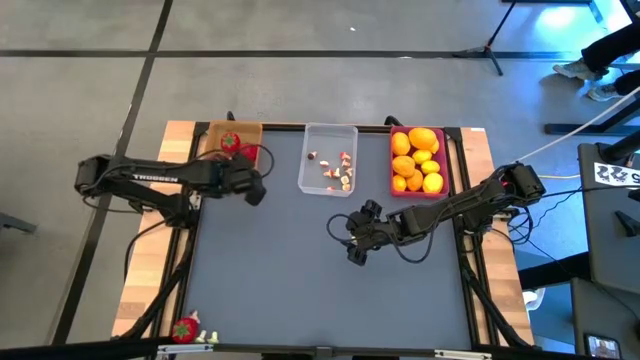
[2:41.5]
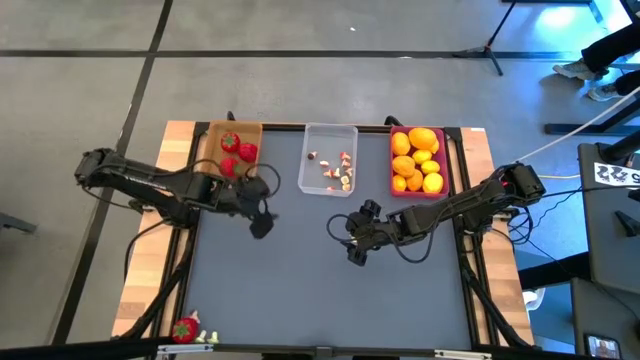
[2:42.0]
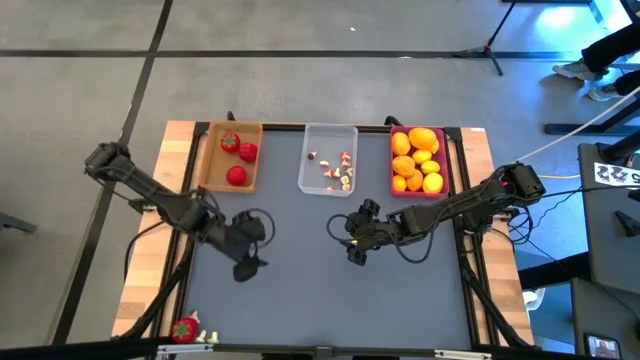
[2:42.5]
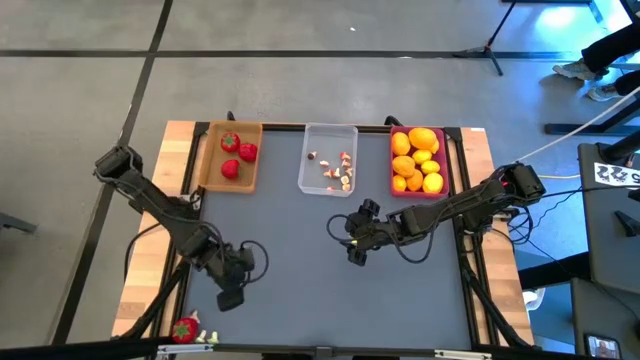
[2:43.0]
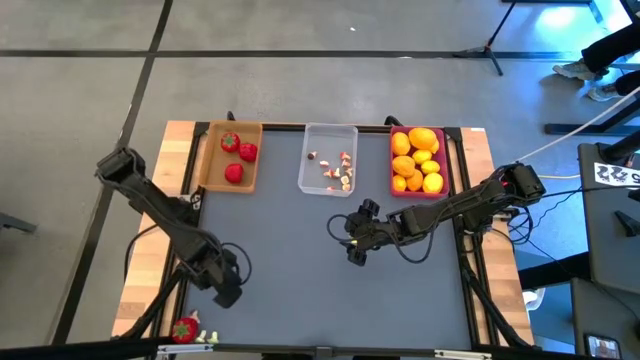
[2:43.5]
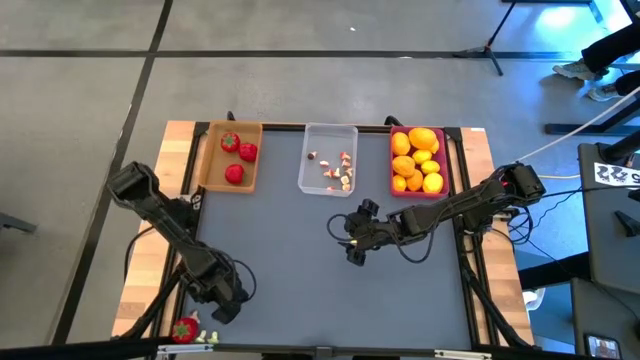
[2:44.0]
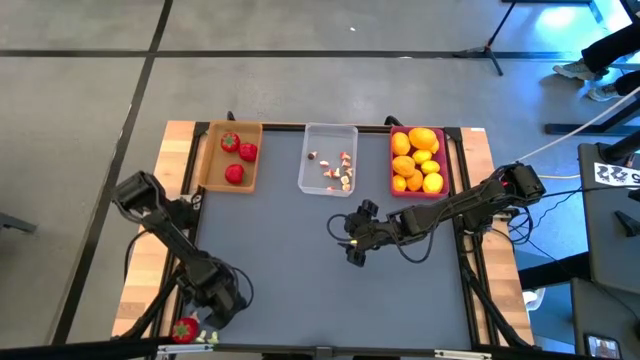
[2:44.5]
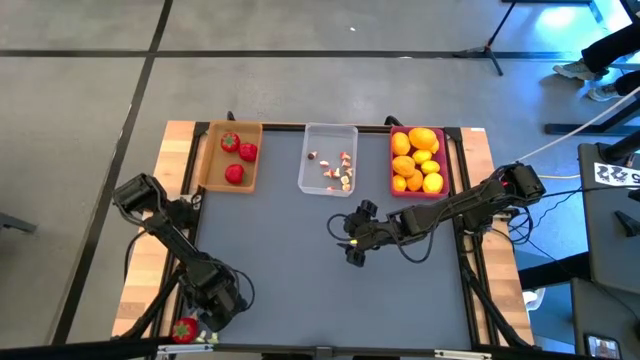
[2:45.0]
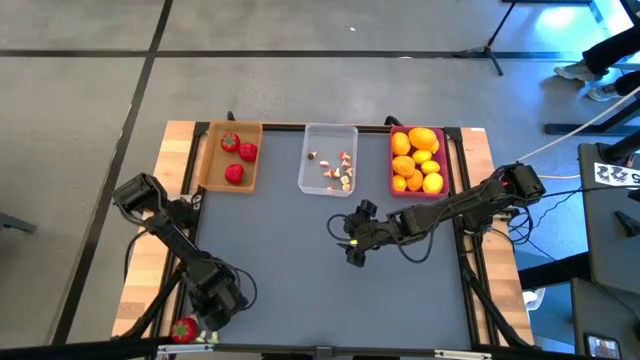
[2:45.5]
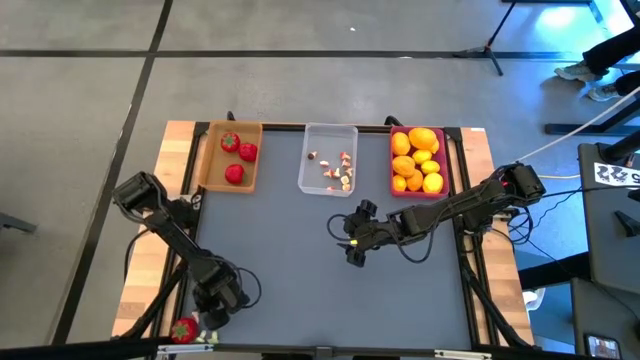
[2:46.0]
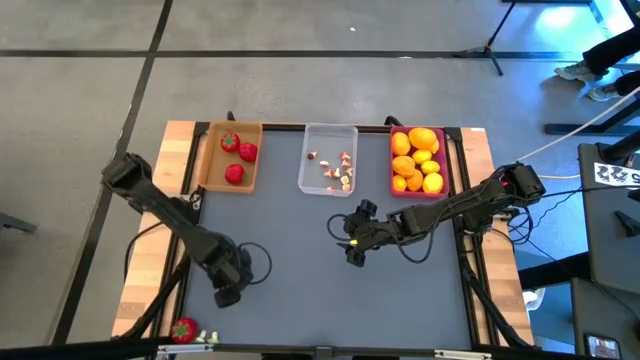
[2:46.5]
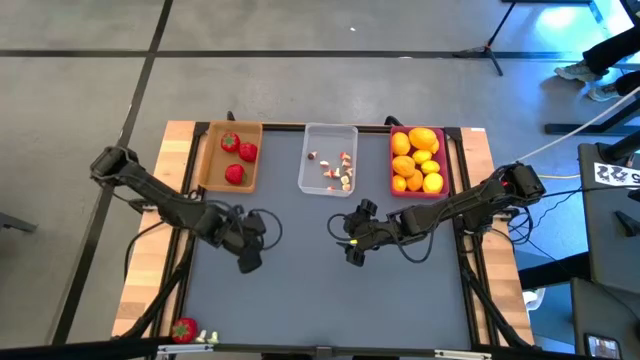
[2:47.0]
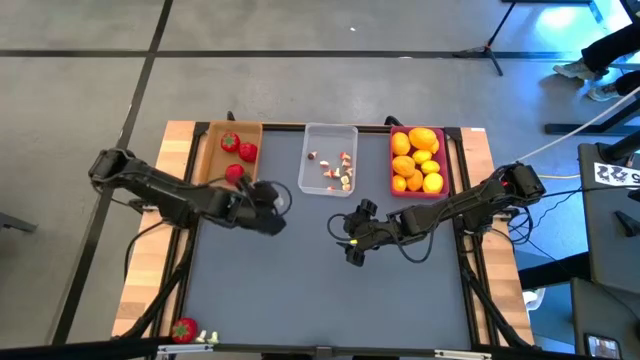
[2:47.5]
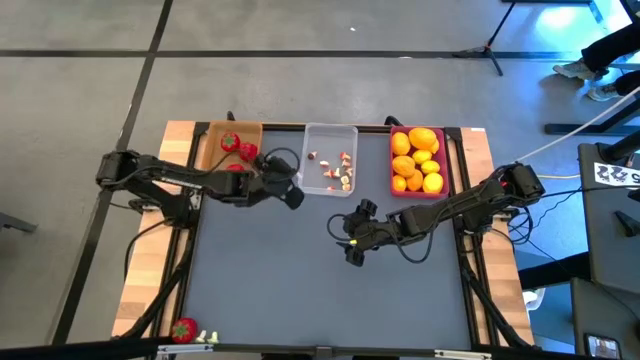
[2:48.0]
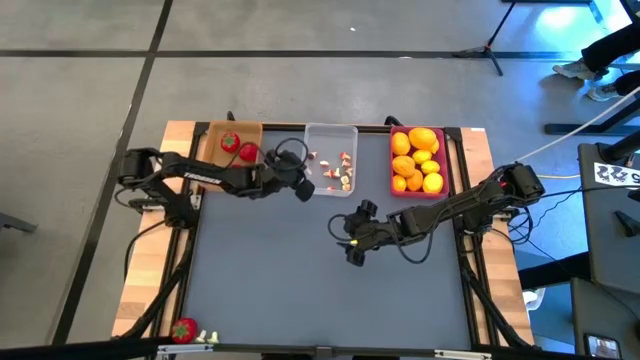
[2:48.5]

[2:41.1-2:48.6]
Task: Sort produce into baskets
Put the mushroom into the transparent bin

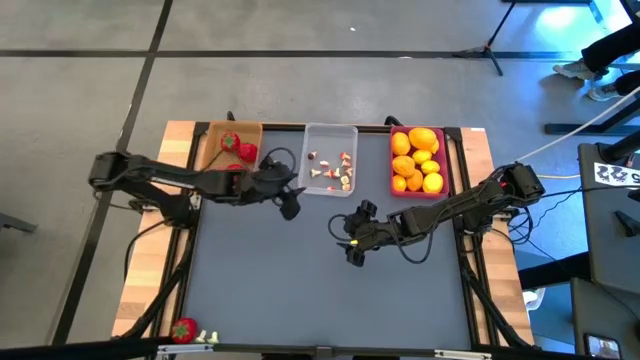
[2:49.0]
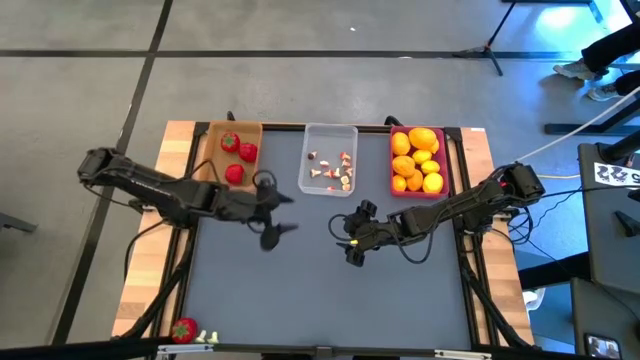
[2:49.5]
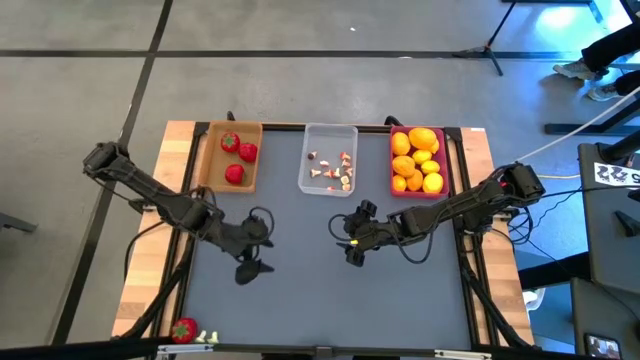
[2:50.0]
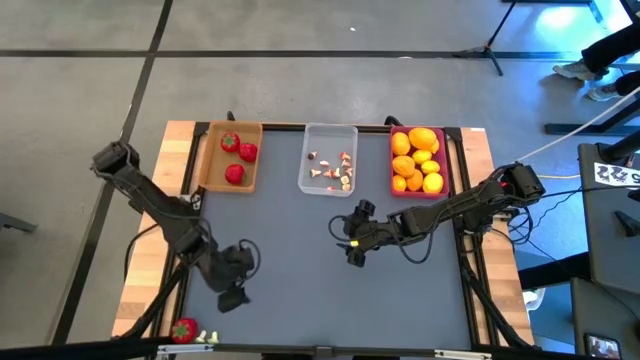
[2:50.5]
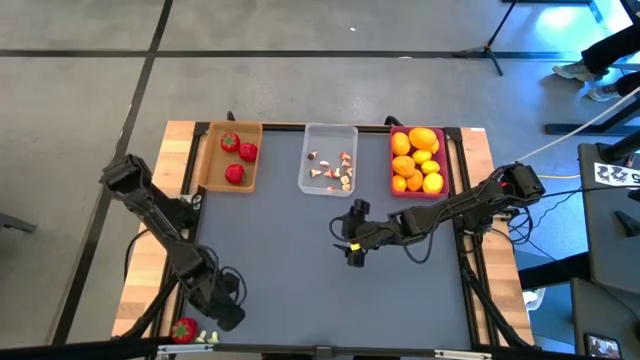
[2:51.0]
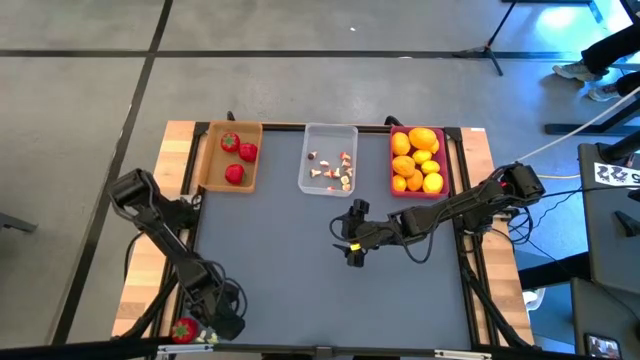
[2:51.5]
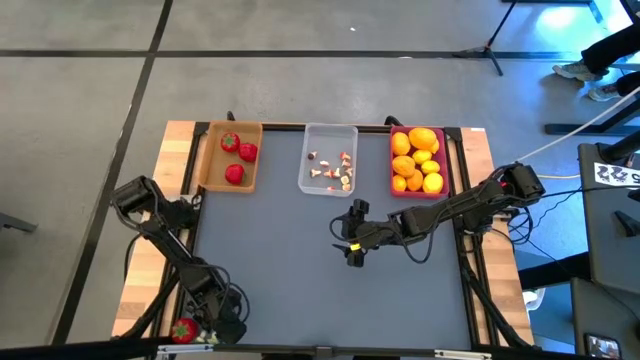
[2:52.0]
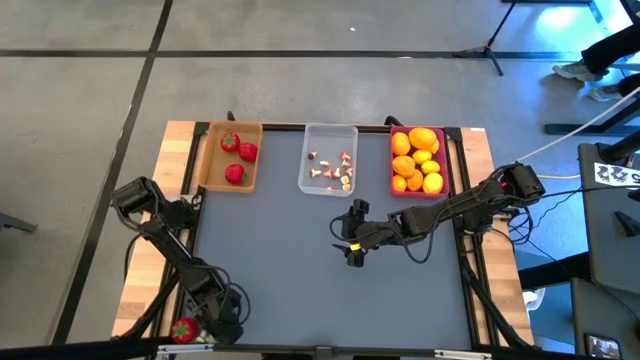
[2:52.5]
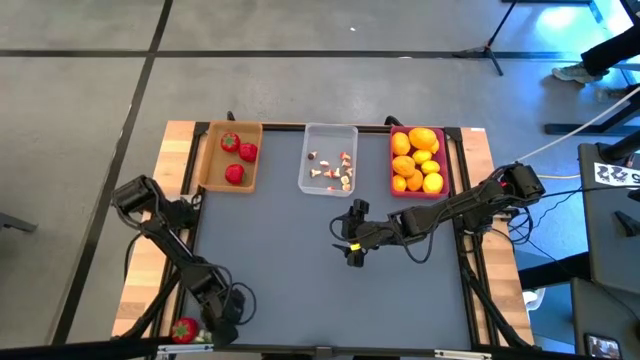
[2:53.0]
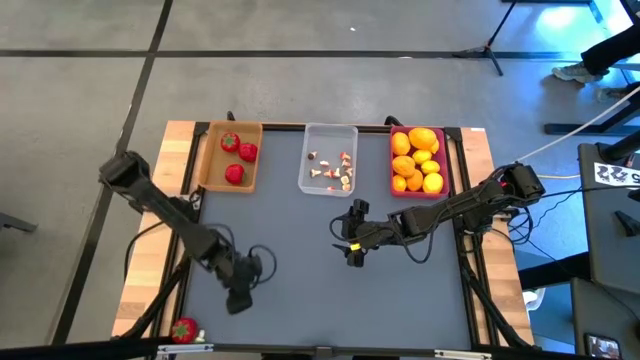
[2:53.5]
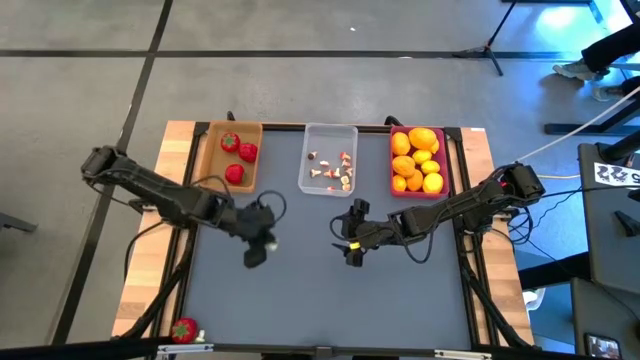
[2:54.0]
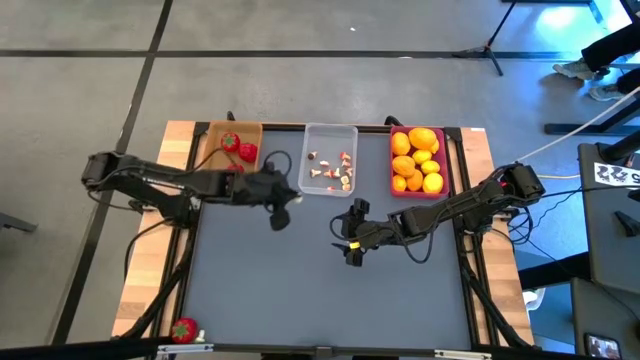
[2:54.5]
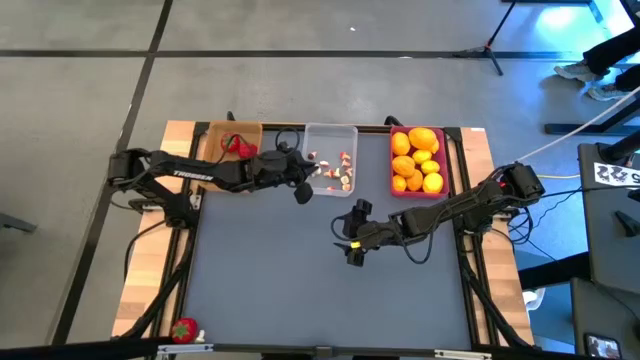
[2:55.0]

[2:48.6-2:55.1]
Put the mushroom into the transparent bin

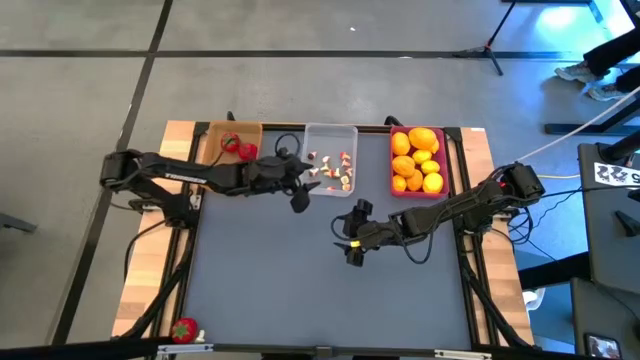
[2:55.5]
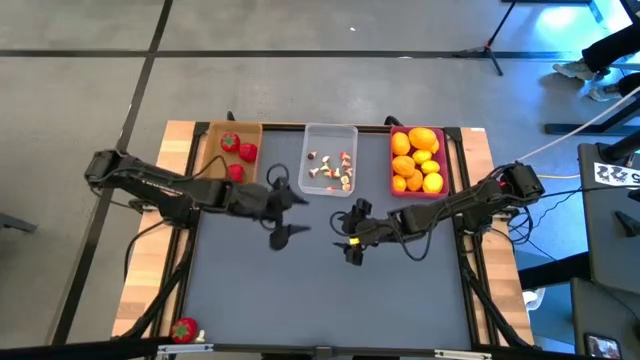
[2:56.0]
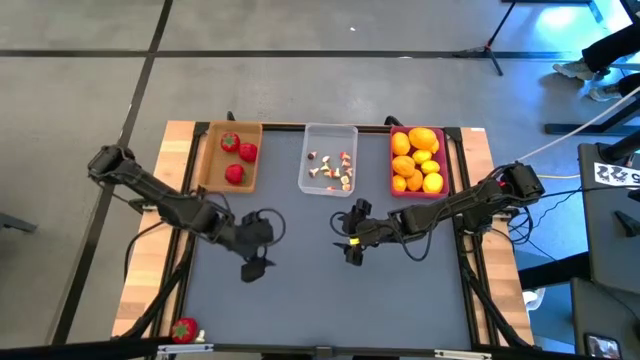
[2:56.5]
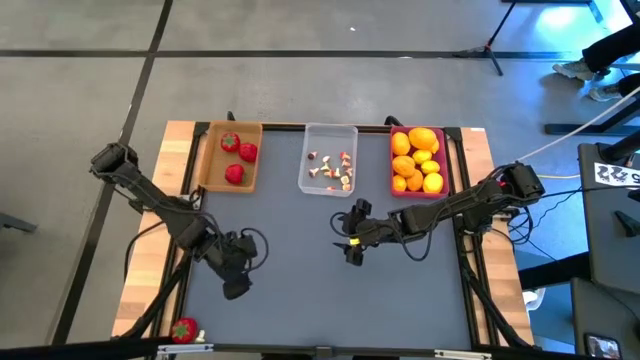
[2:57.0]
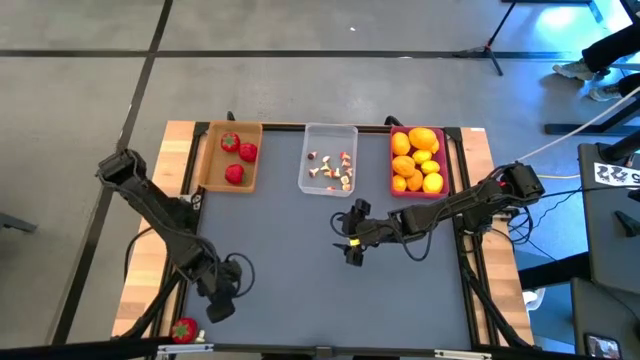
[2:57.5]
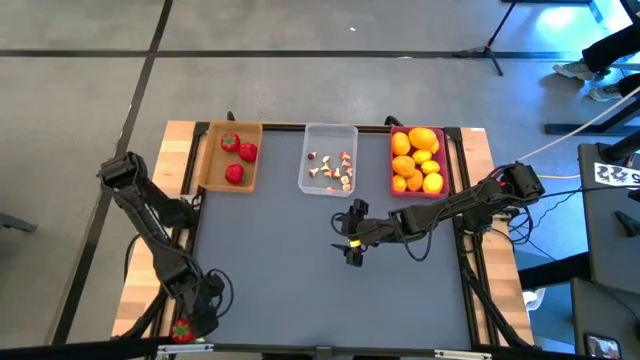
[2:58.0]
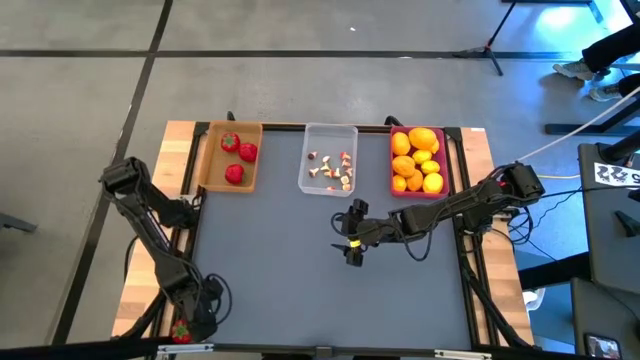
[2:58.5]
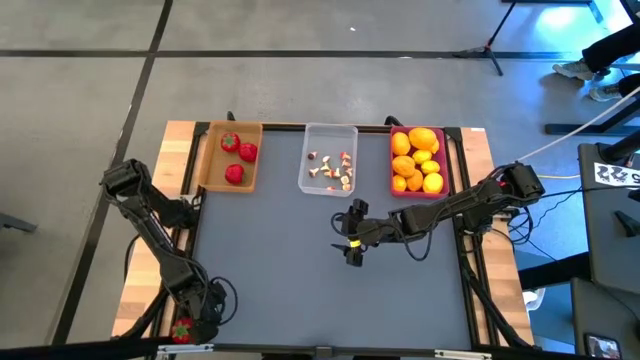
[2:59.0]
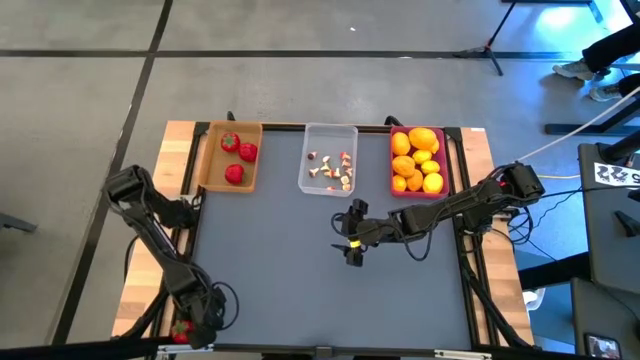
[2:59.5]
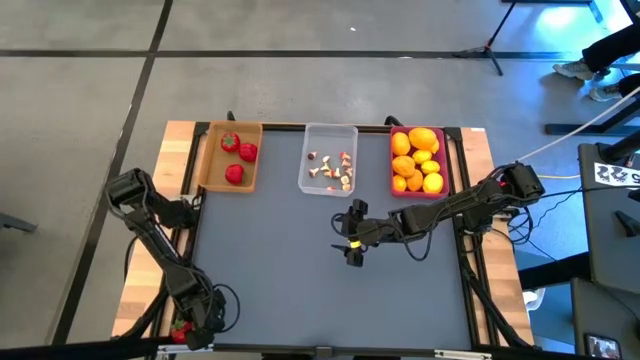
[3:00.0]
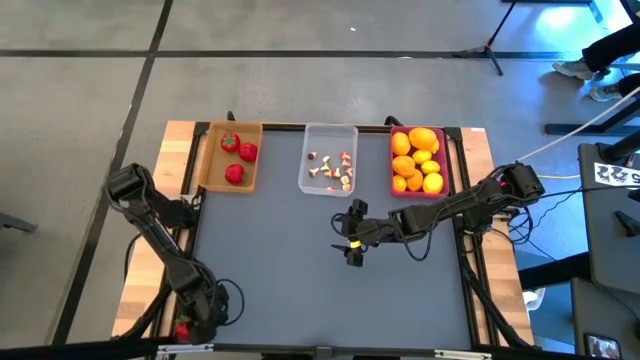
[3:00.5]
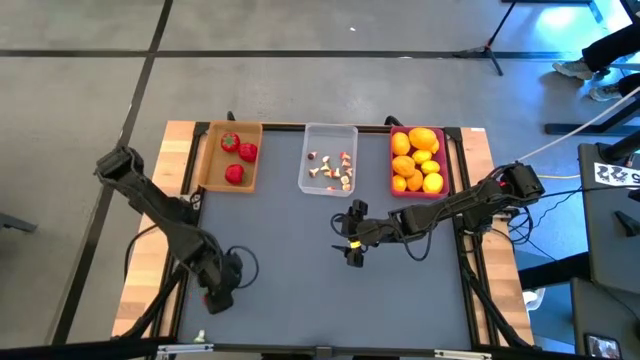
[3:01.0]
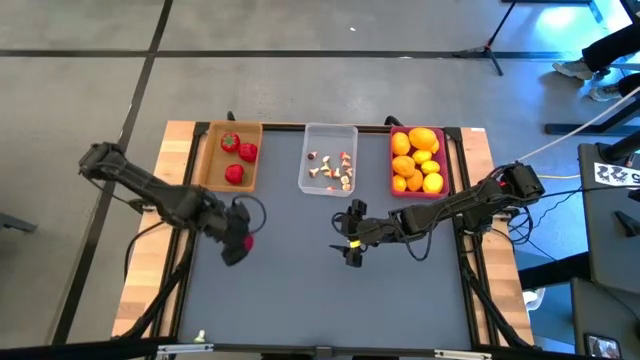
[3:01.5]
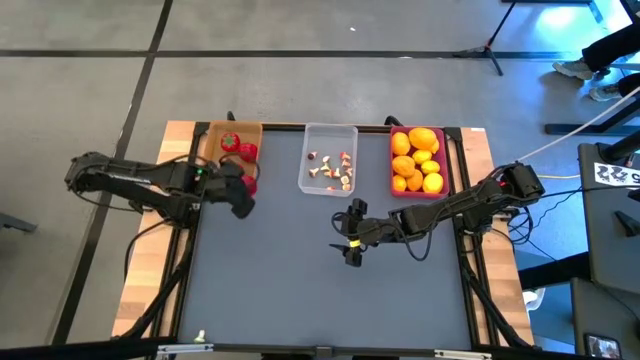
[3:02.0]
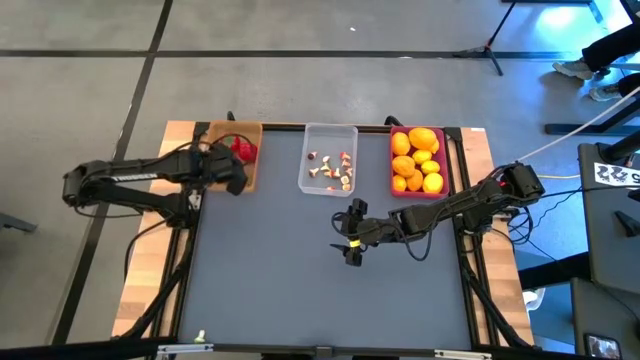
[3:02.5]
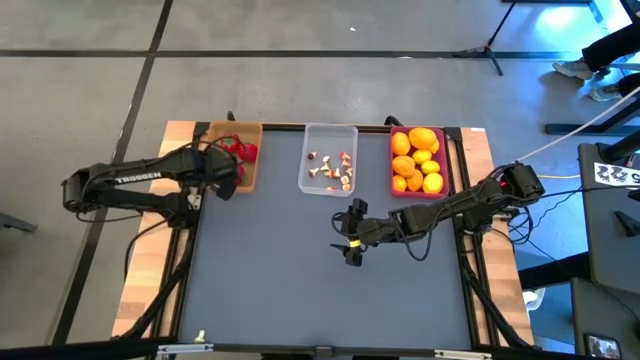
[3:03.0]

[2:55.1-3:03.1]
Put the tomato into the orange bin
